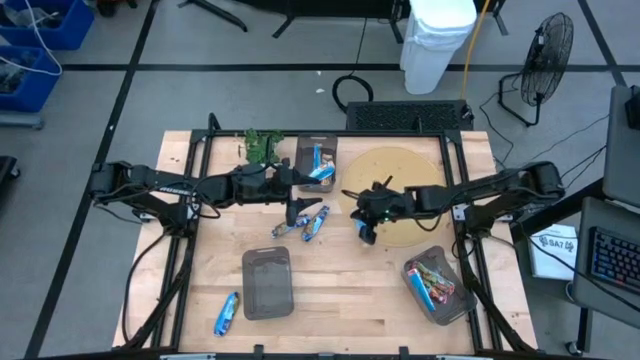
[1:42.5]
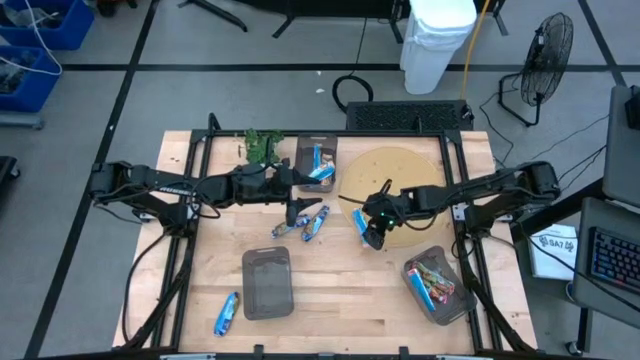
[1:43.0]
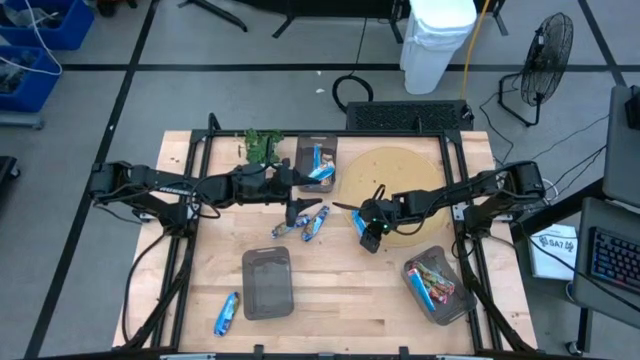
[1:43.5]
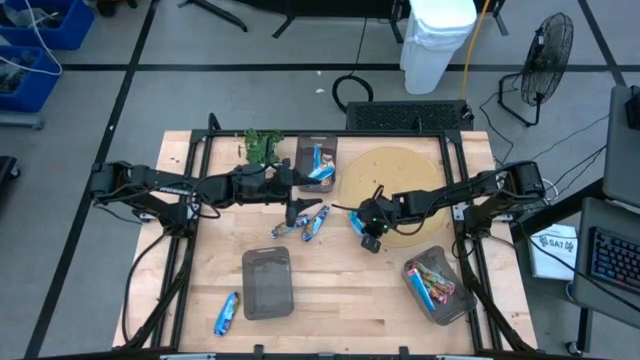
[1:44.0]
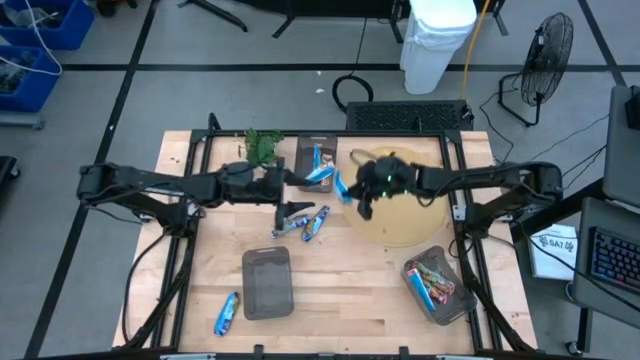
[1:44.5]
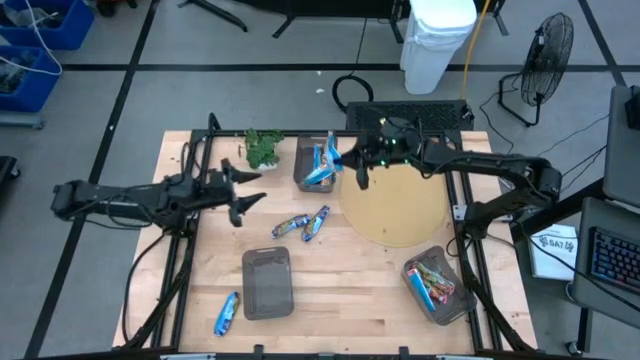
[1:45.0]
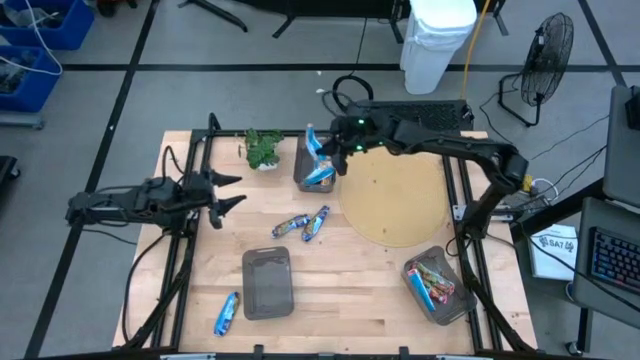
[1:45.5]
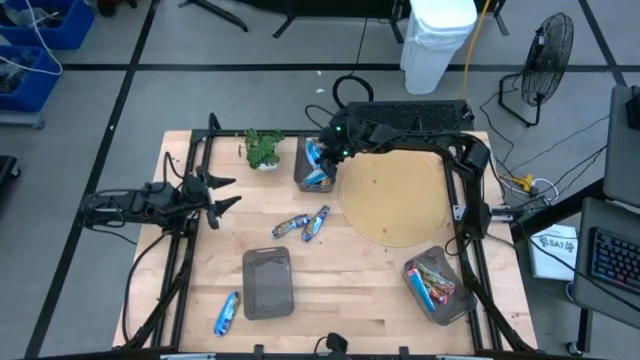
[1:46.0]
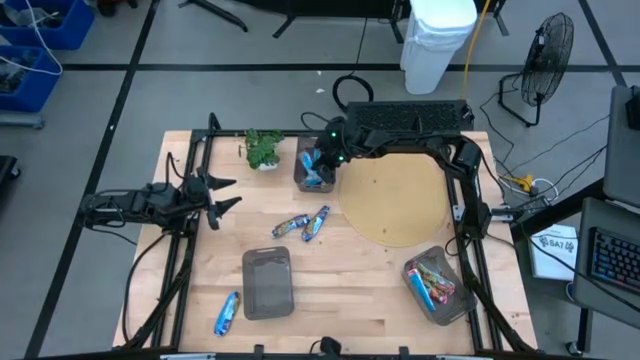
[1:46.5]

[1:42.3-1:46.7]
Task: Pick and place Granola Bars by type
Put the yellow granola bar into the top black bin

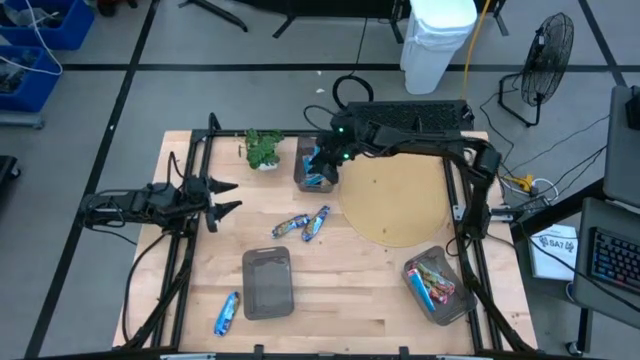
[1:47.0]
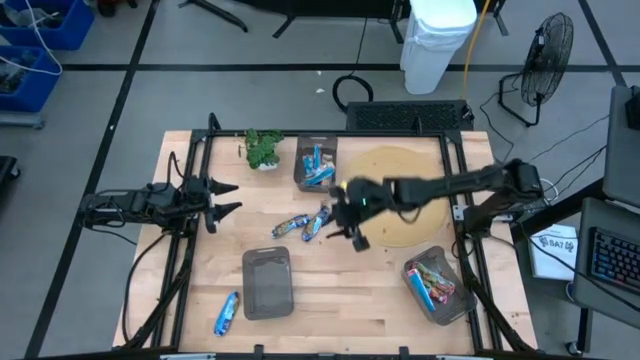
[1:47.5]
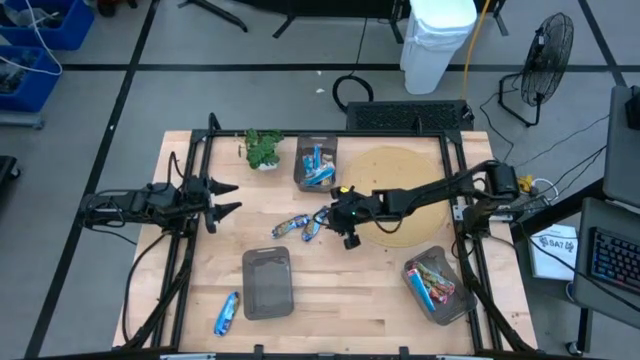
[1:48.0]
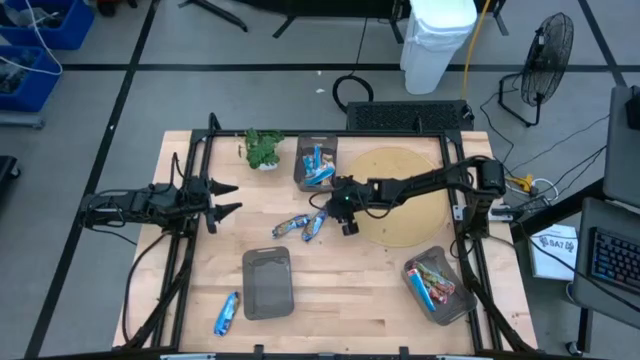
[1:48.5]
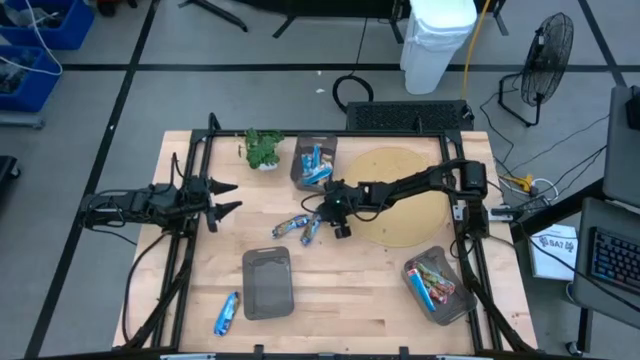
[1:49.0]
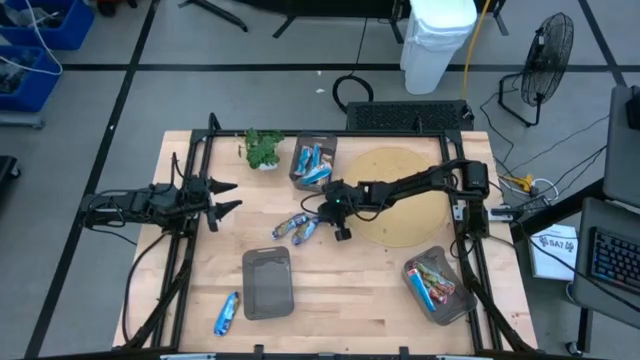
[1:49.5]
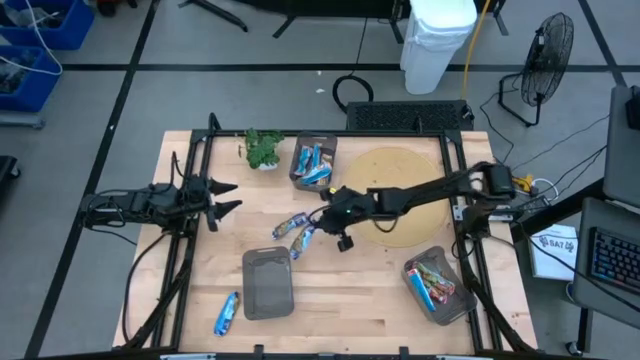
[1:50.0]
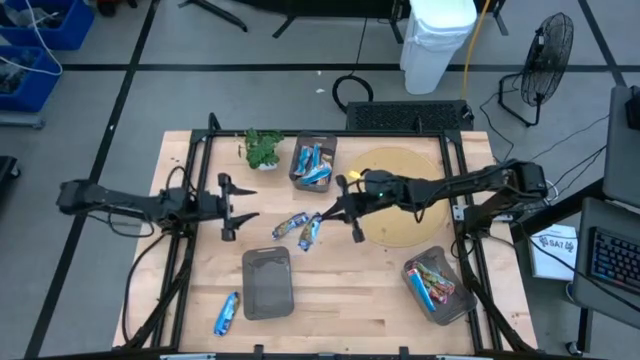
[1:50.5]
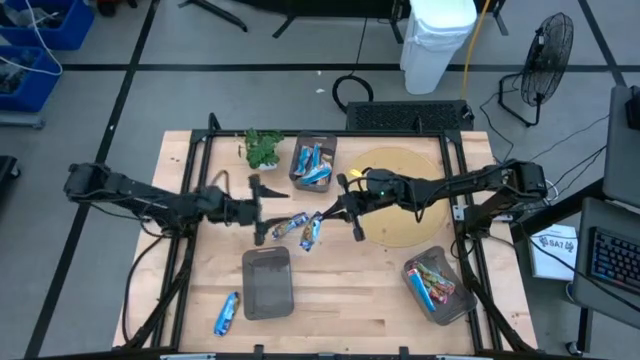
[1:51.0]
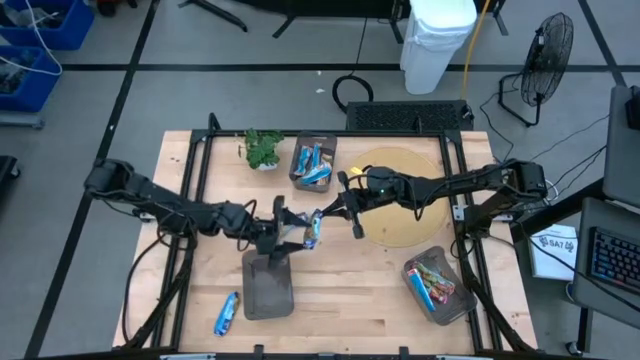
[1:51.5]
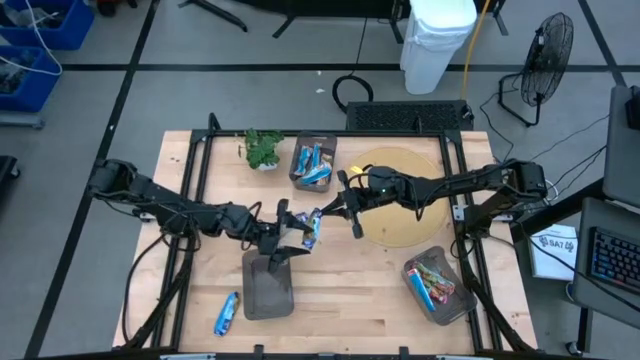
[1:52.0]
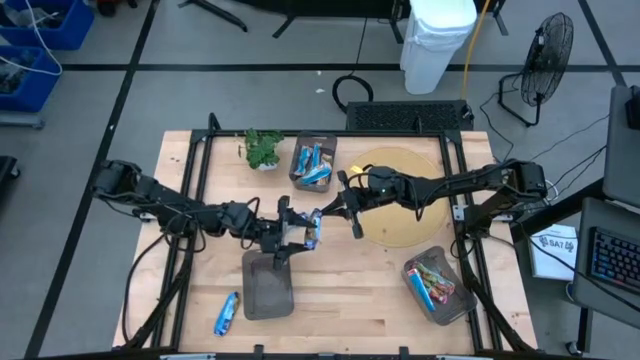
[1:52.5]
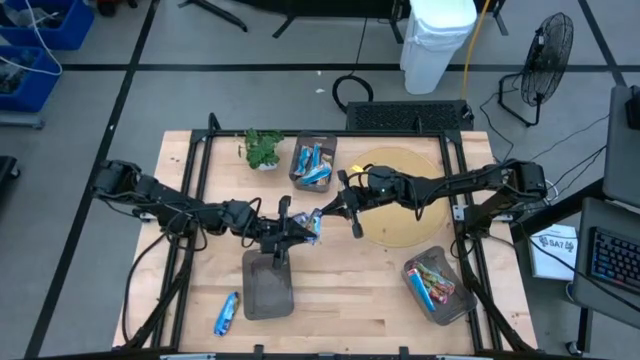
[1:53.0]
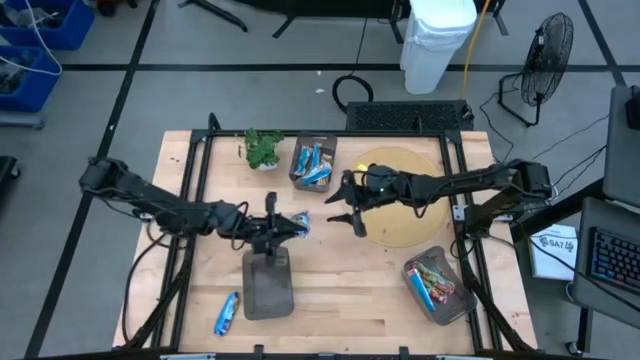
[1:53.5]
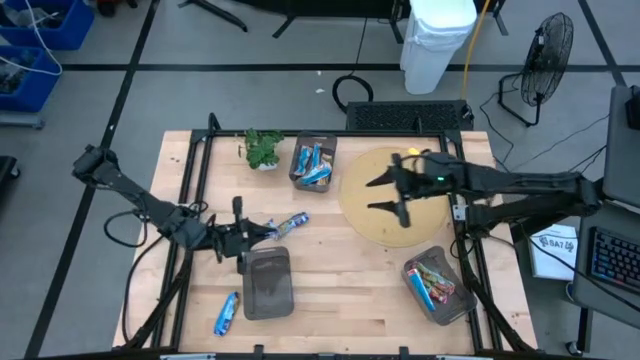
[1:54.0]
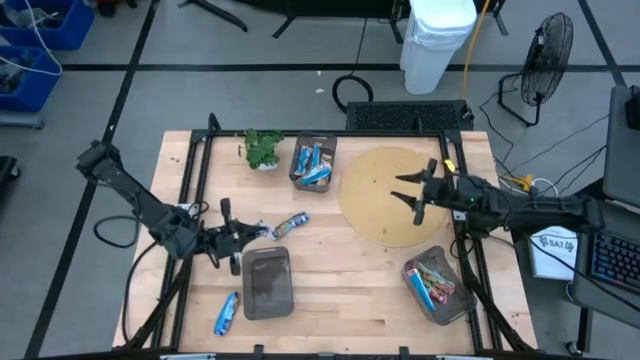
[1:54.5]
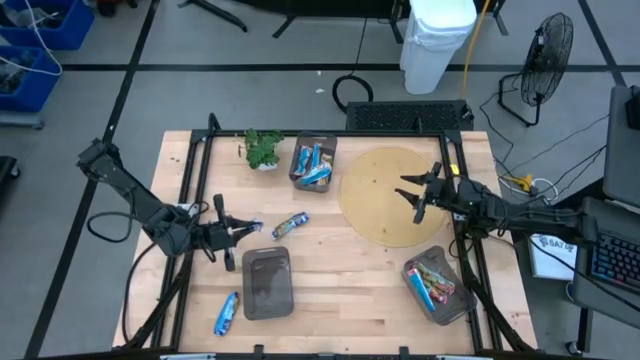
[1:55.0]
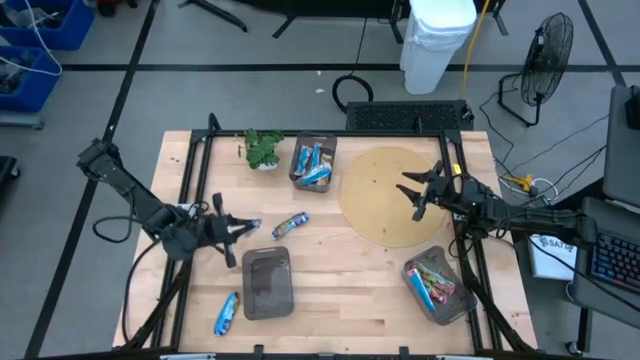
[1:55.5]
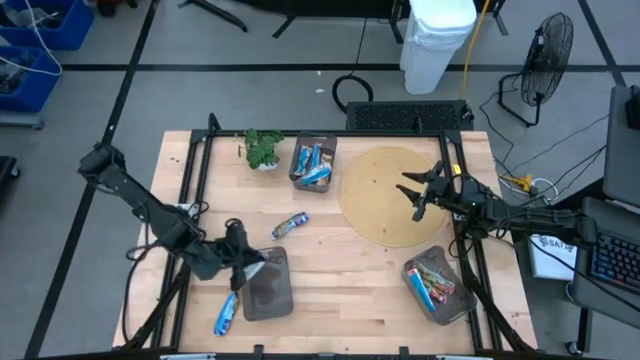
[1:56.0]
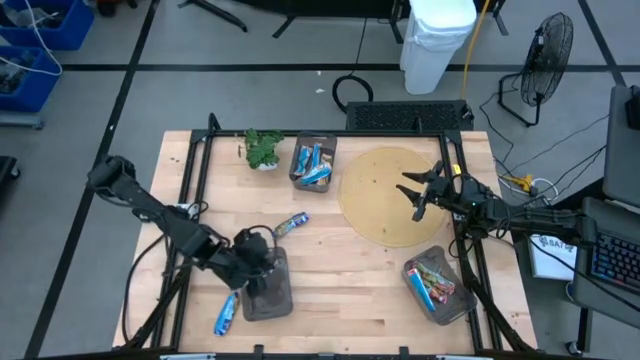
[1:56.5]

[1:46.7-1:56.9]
Put the blue granola bar into the bottom left black bin

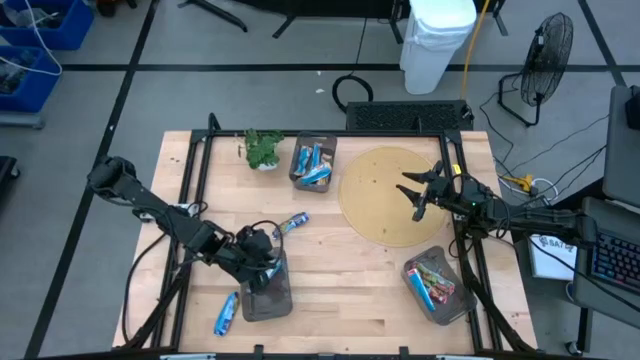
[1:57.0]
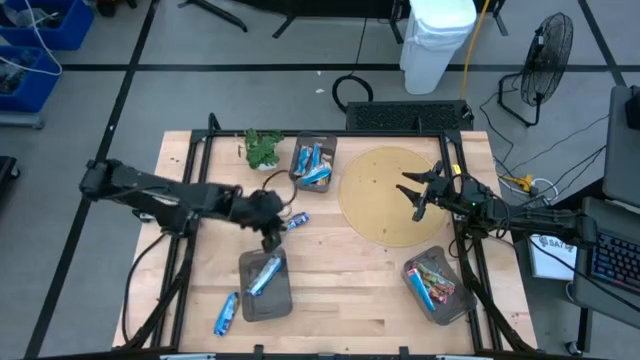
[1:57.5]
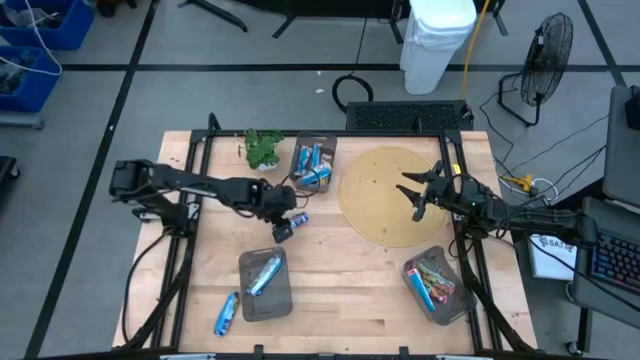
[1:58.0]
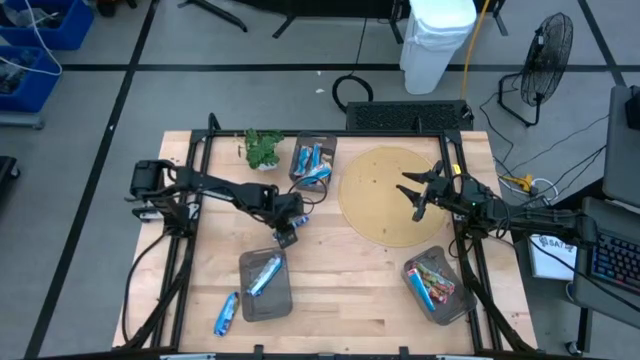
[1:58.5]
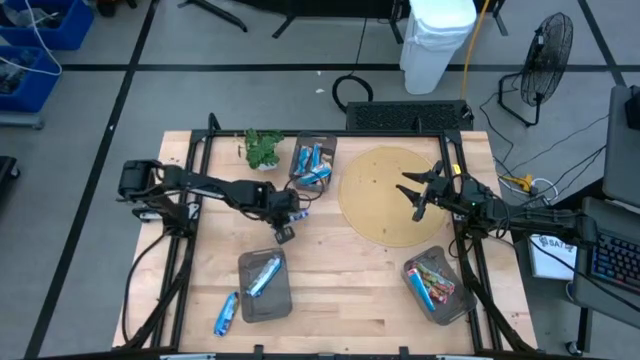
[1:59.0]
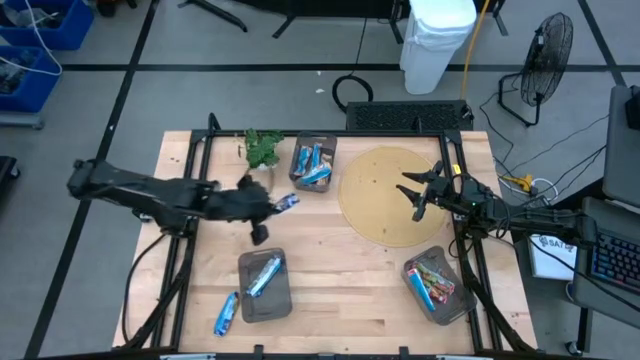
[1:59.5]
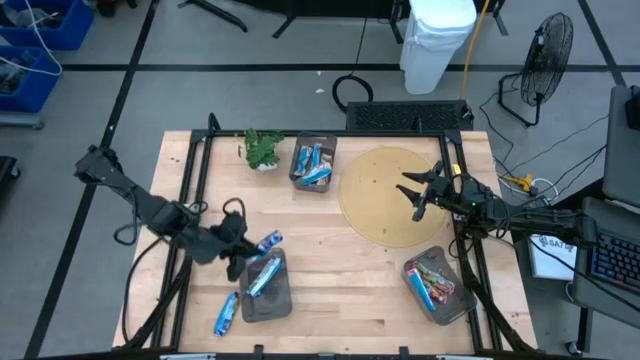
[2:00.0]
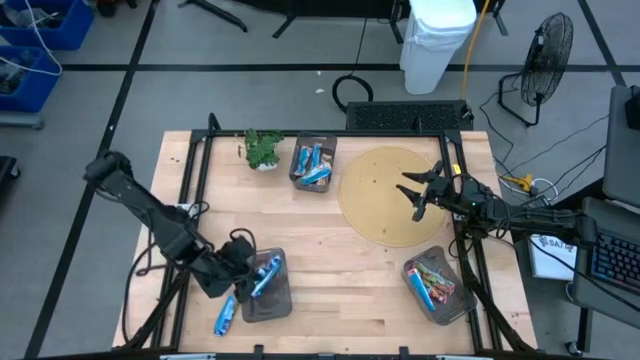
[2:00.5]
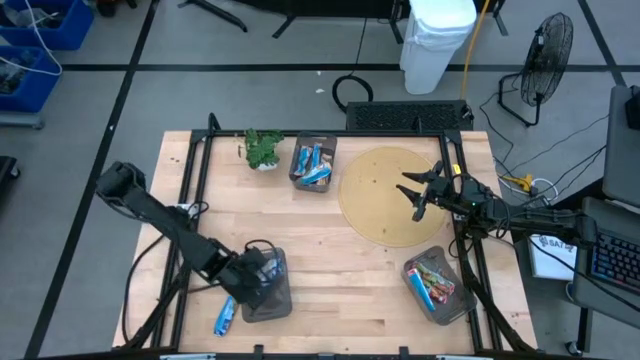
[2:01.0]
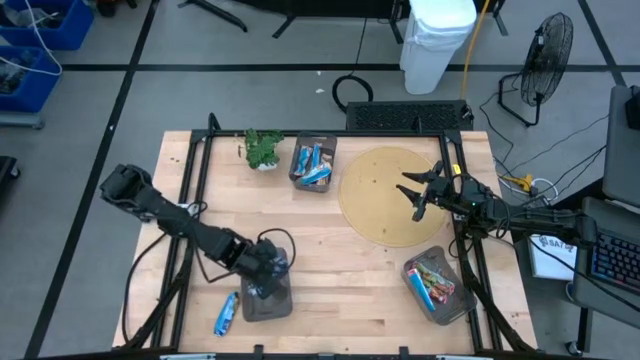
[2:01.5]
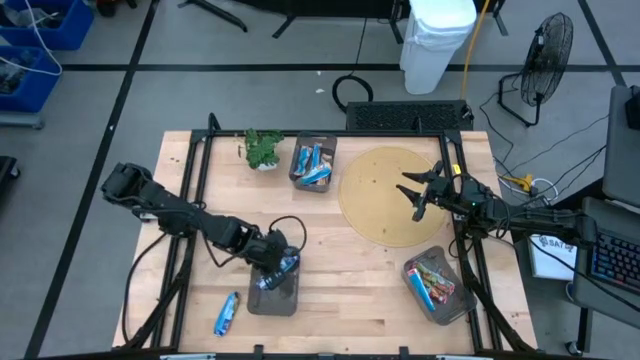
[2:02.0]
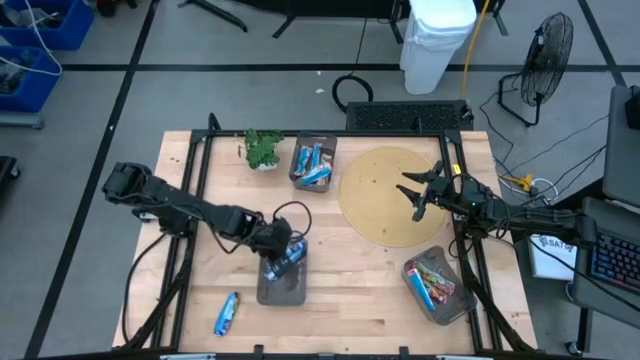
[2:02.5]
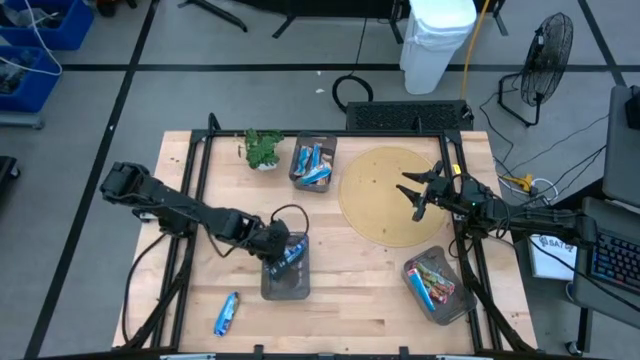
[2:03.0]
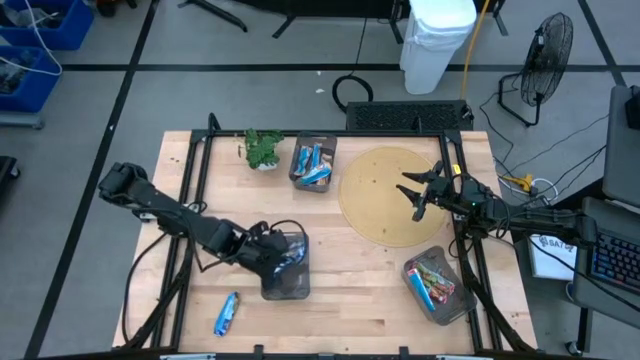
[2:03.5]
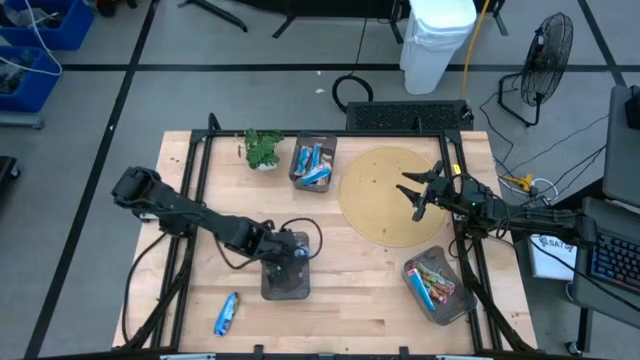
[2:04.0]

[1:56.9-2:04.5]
Put the top blue granola bar into the bottom left black bin
